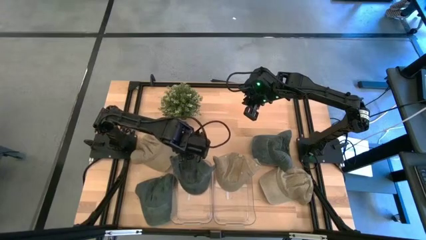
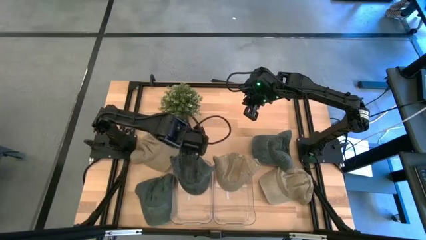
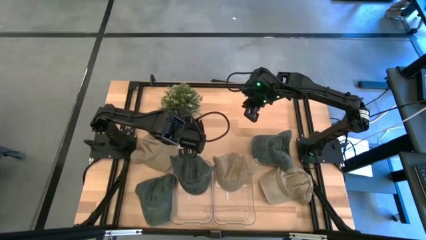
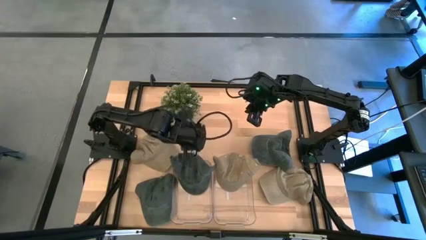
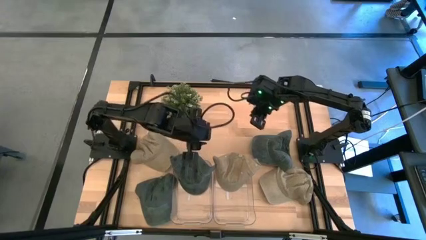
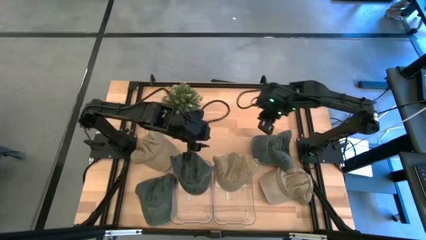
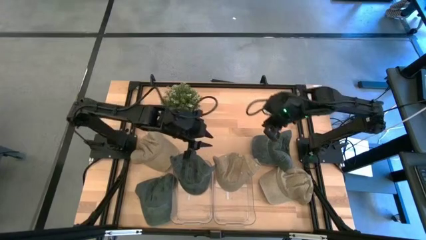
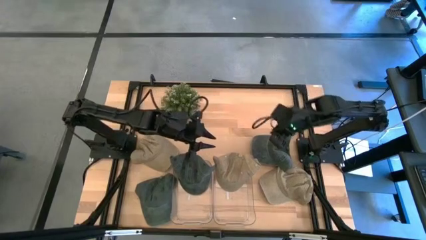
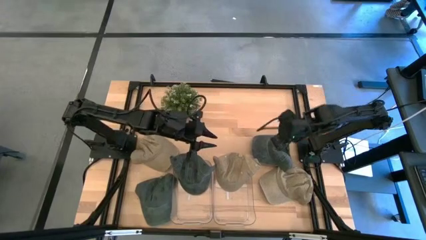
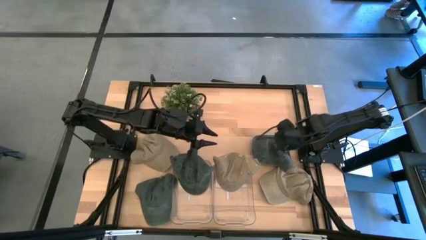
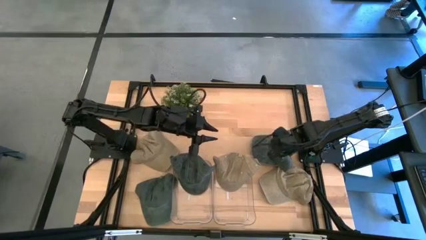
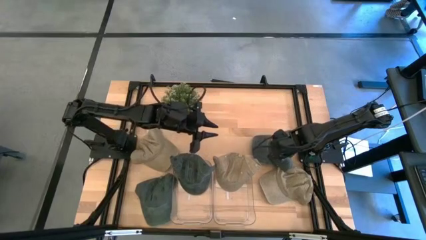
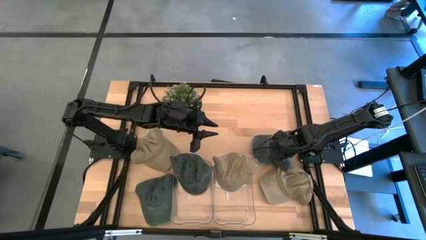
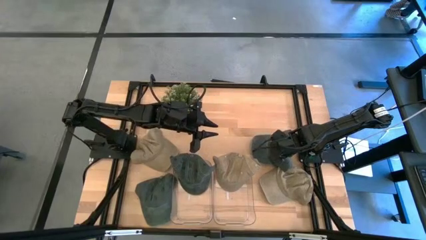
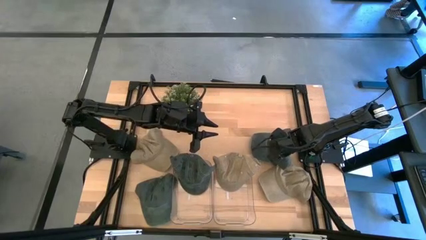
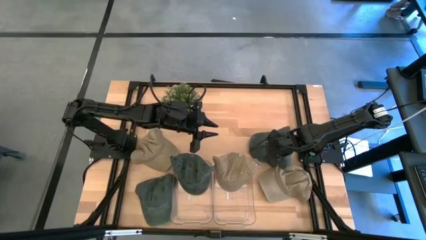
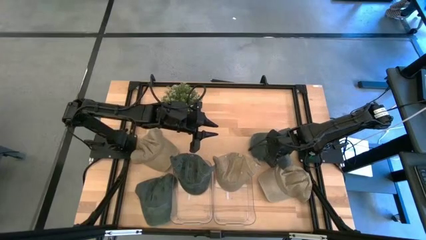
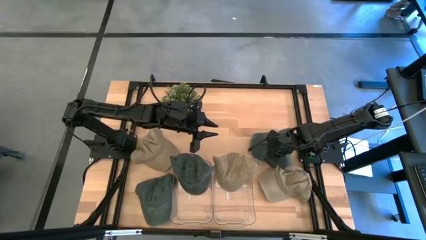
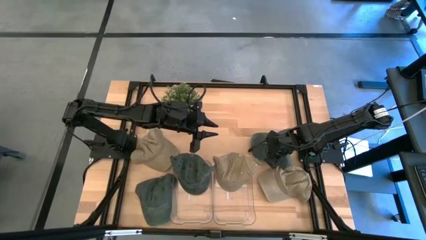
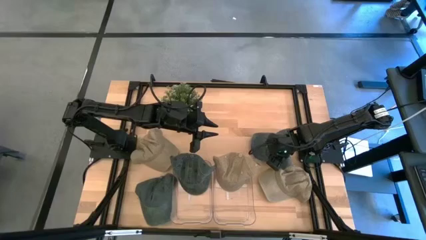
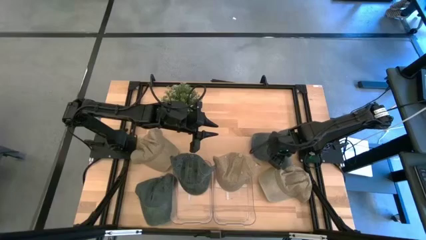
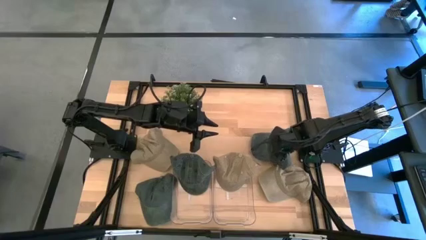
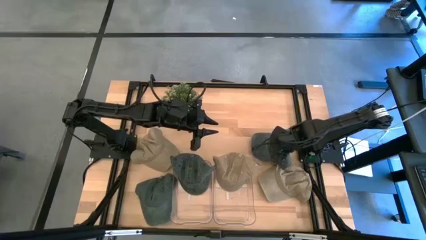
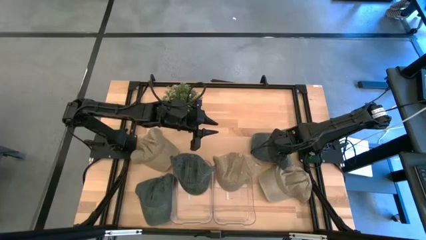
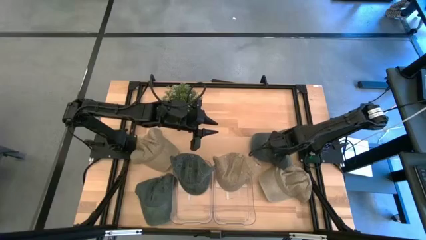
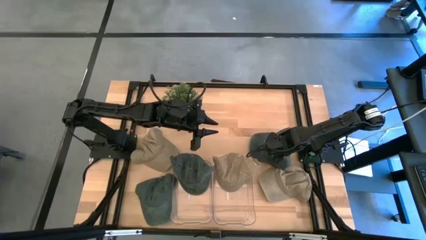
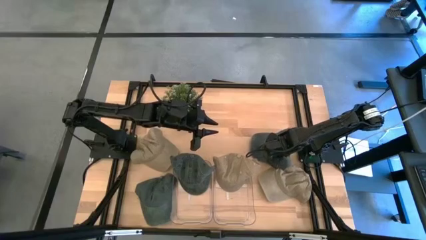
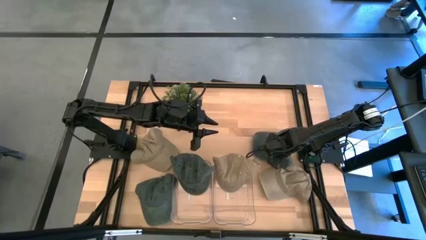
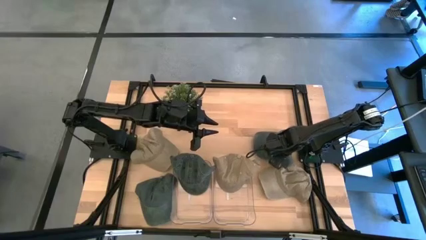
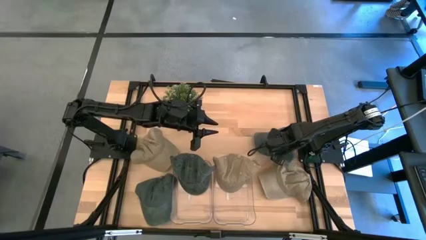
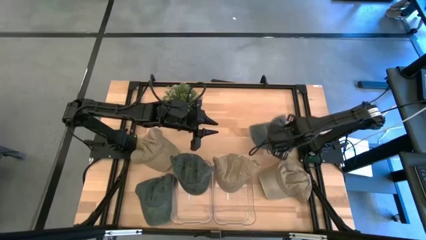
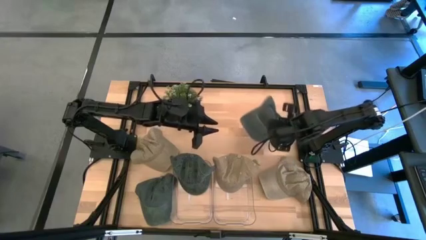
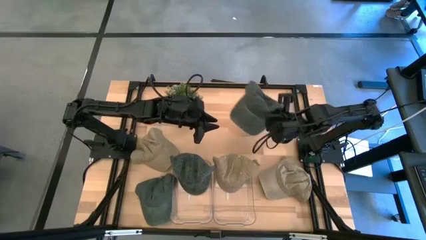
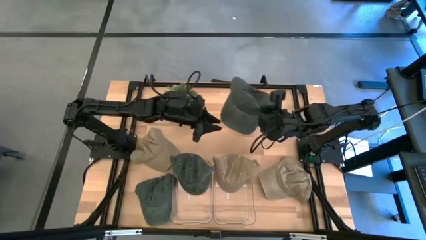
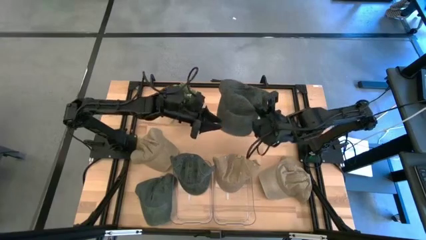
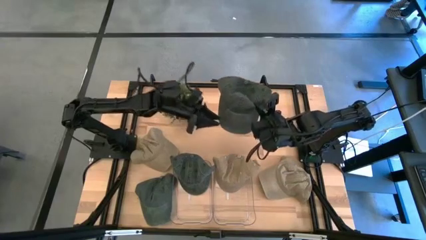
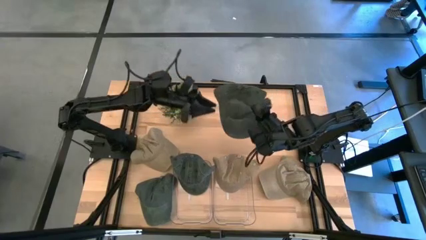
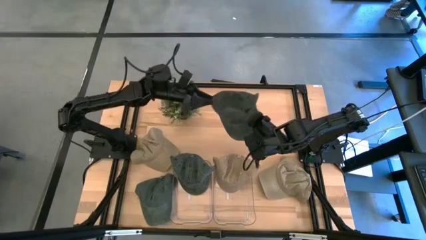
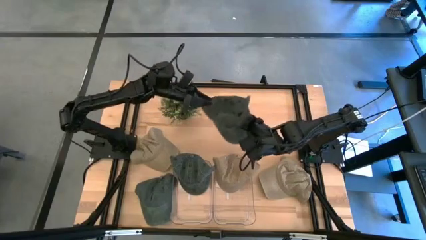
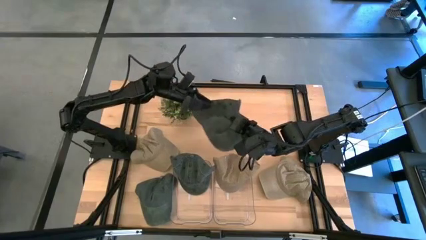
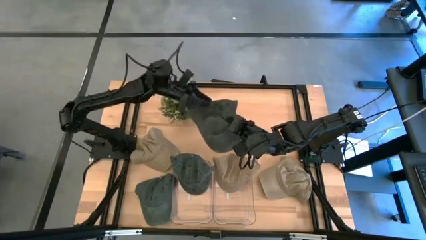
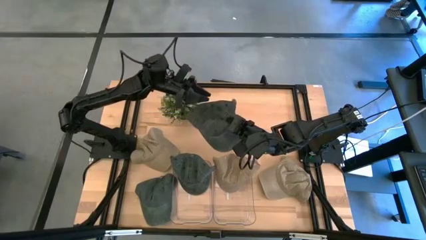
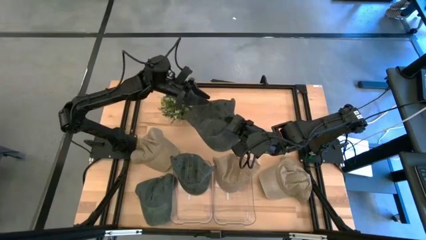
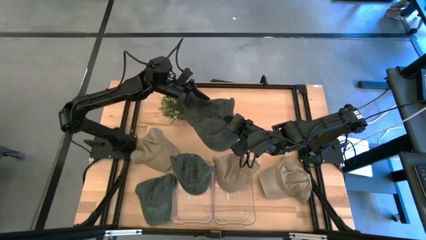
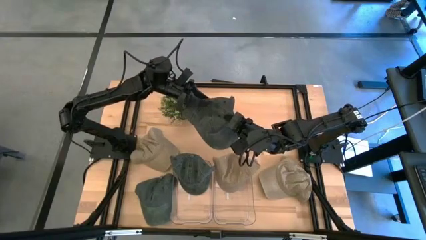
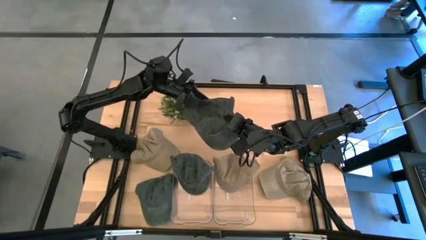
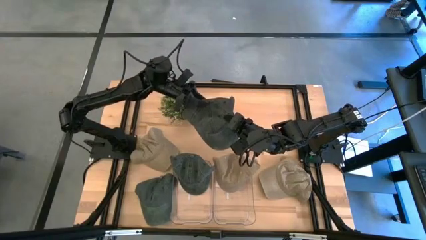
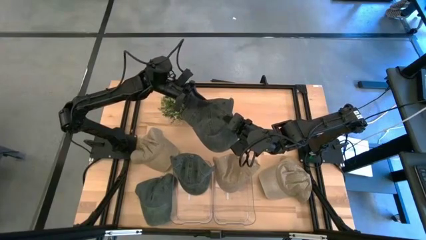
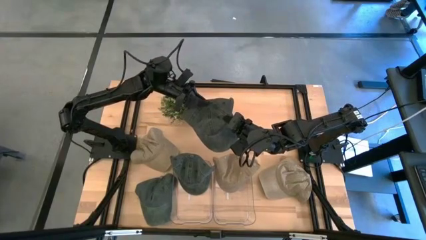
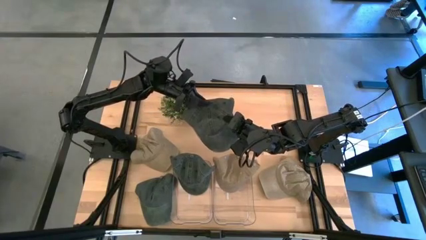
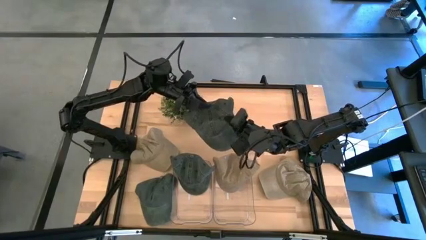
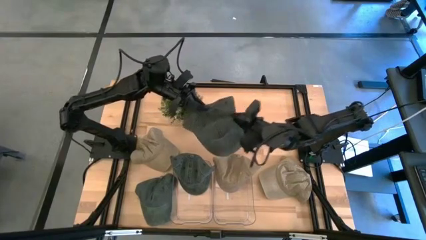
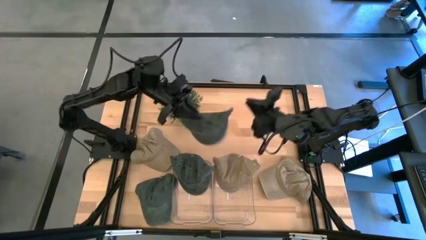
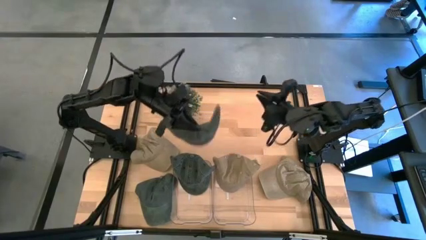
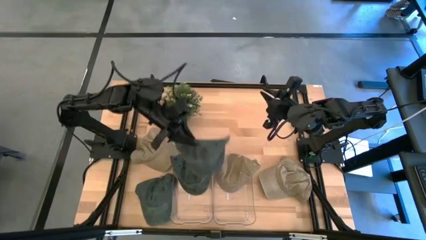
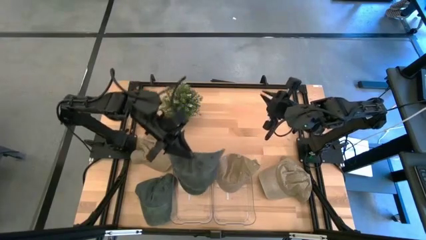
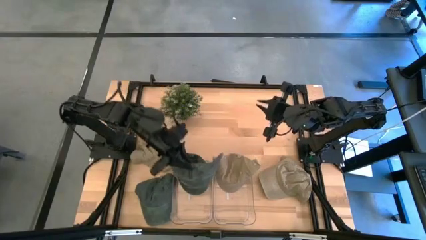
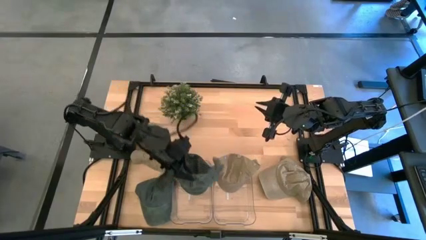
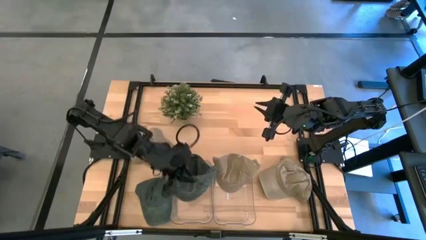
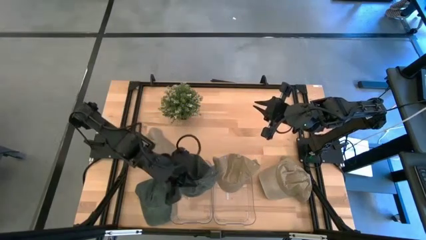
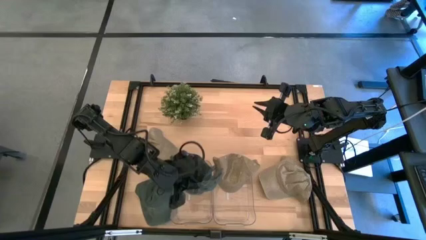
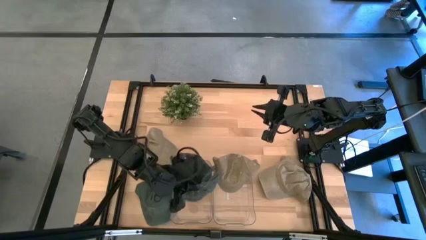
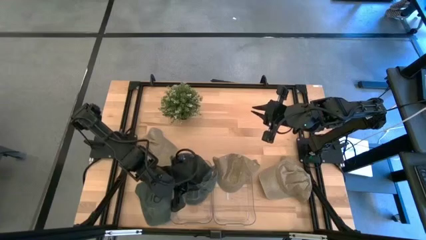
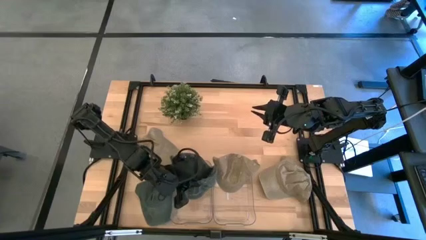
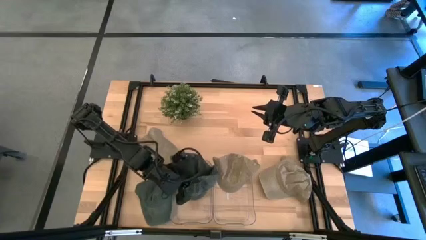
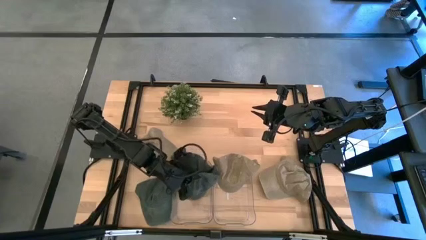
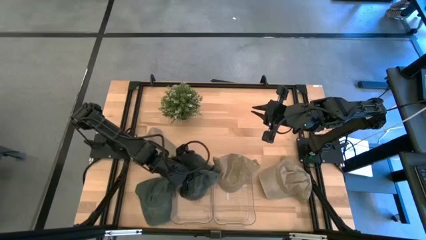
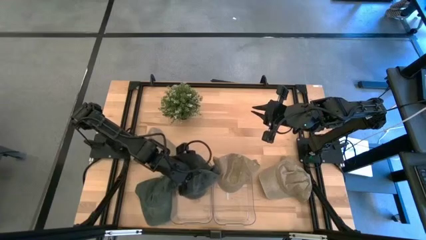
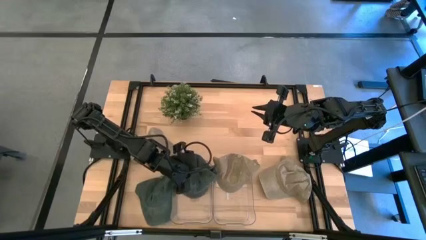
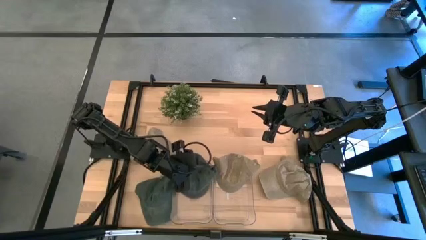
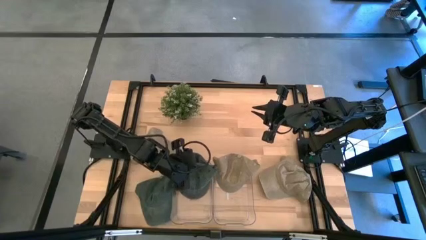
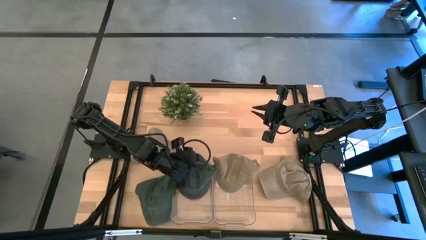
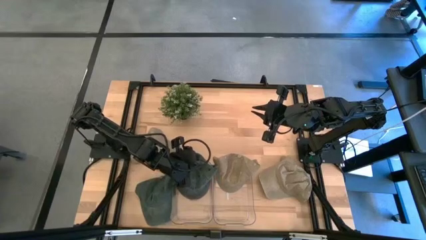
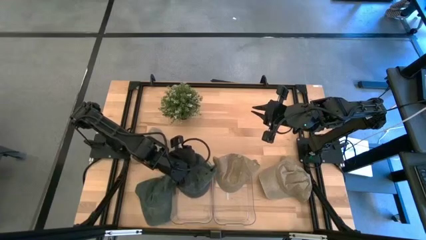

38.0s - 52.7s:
Task: Pick & Place hat
Put the top black cap into the left transparent bin
